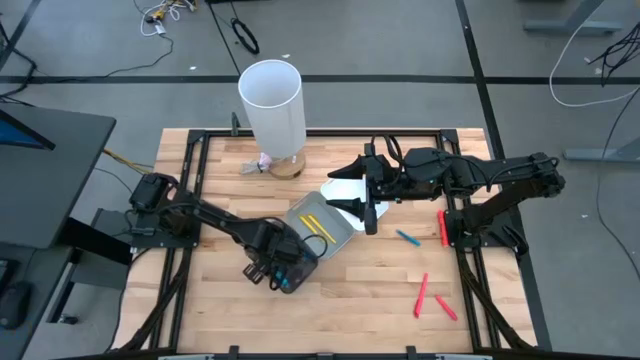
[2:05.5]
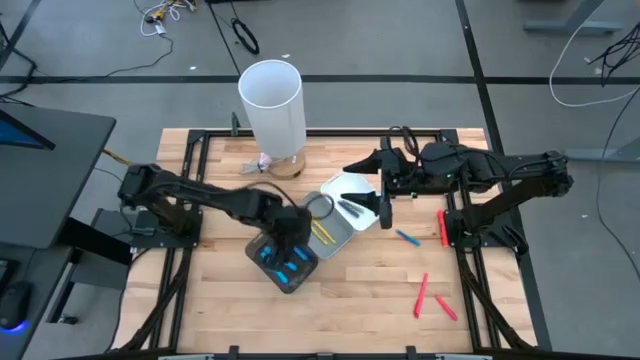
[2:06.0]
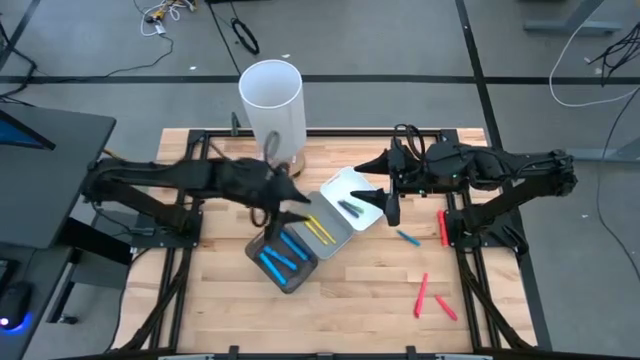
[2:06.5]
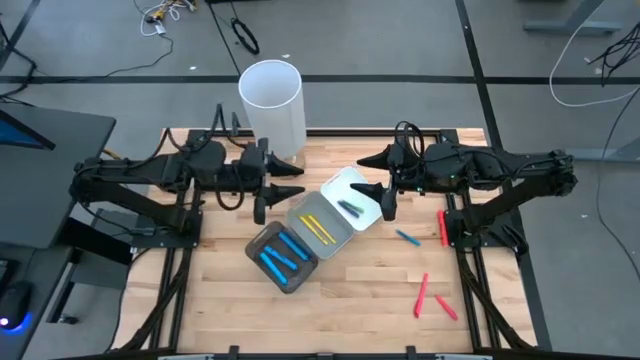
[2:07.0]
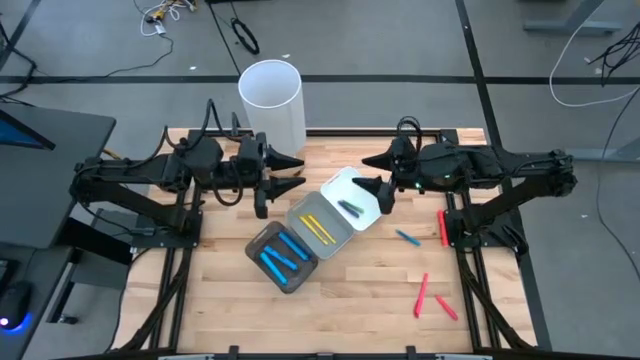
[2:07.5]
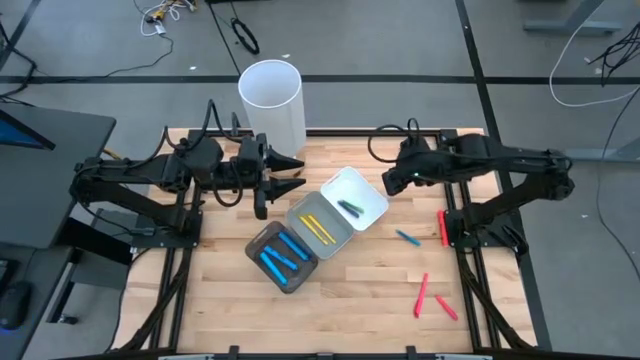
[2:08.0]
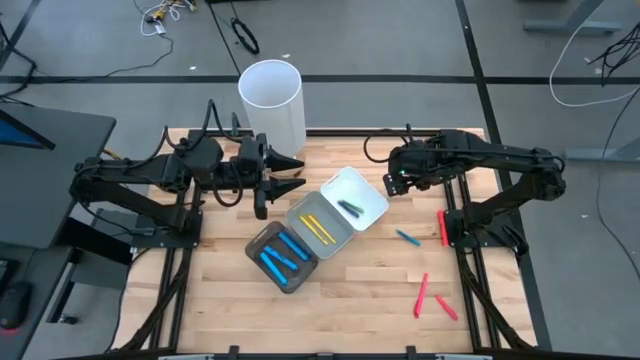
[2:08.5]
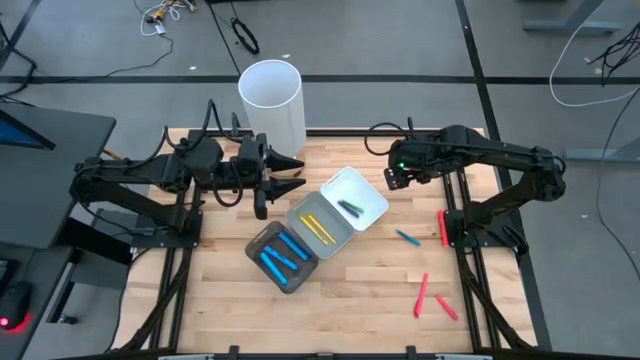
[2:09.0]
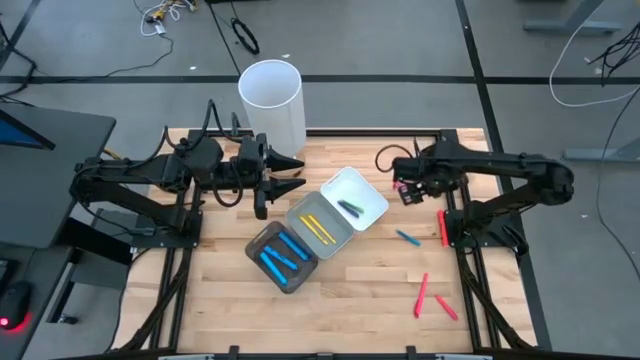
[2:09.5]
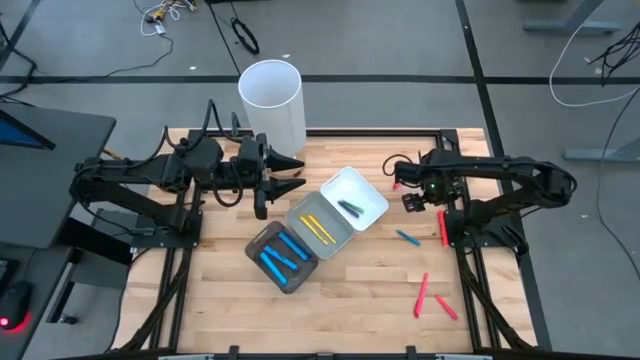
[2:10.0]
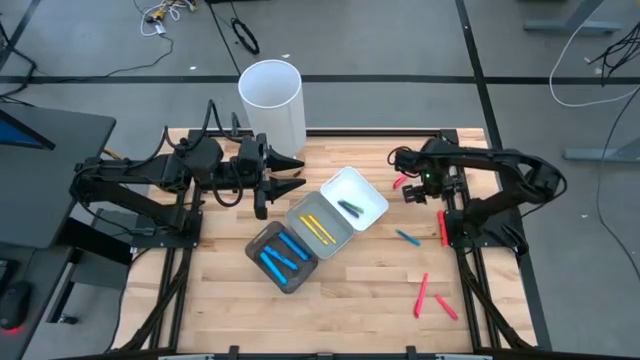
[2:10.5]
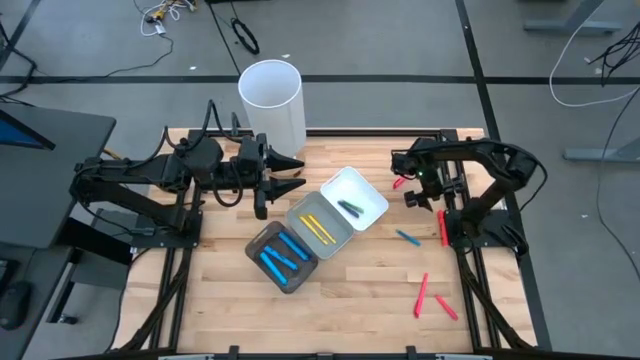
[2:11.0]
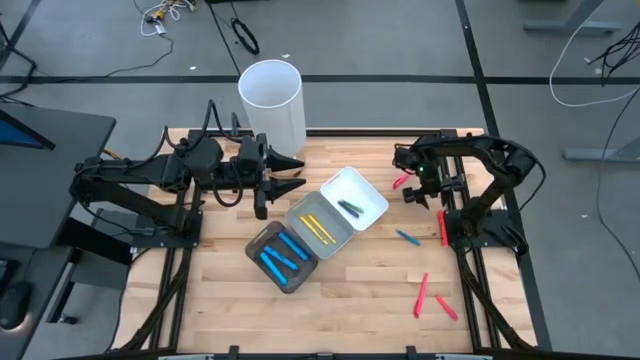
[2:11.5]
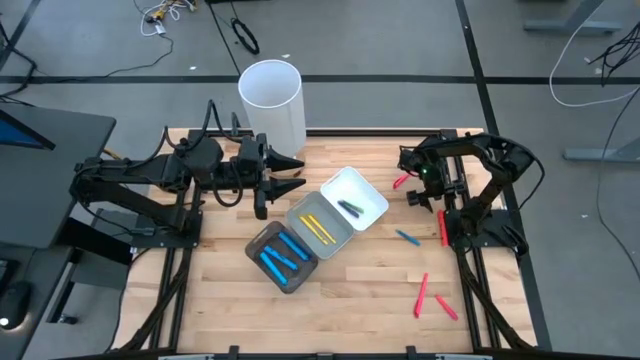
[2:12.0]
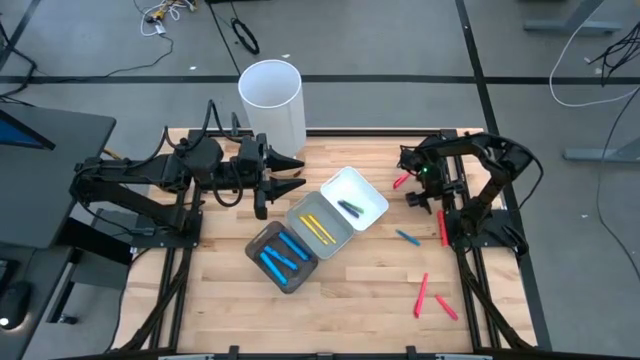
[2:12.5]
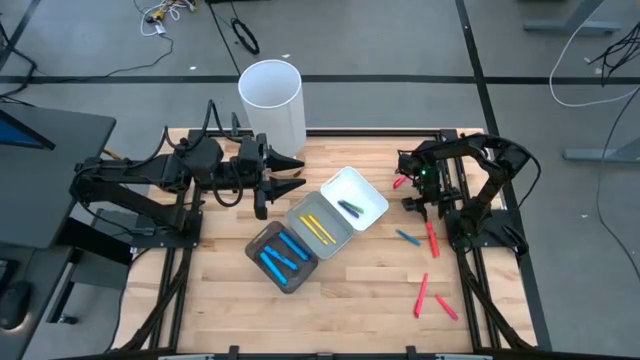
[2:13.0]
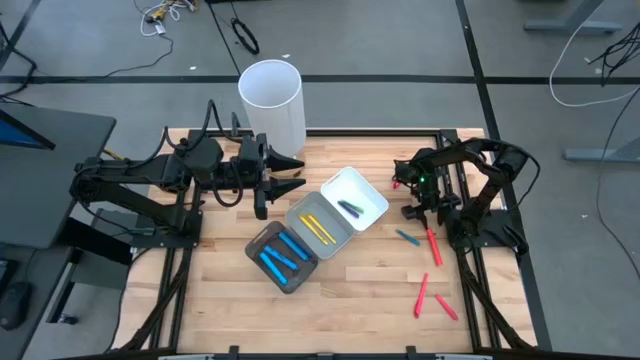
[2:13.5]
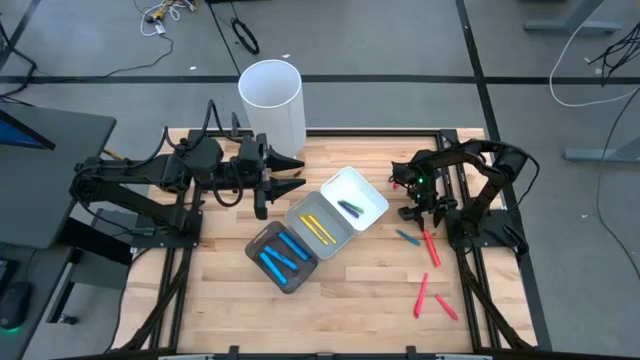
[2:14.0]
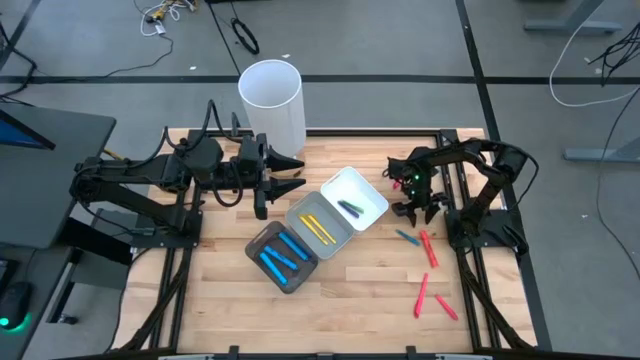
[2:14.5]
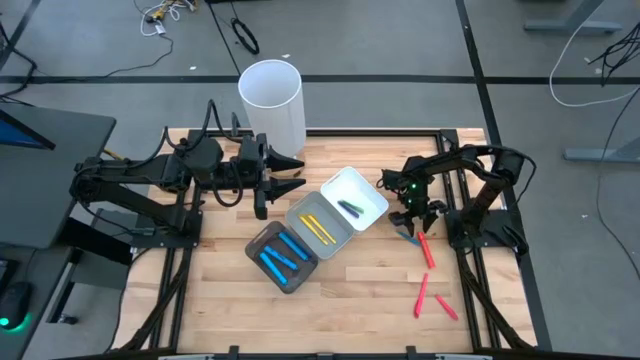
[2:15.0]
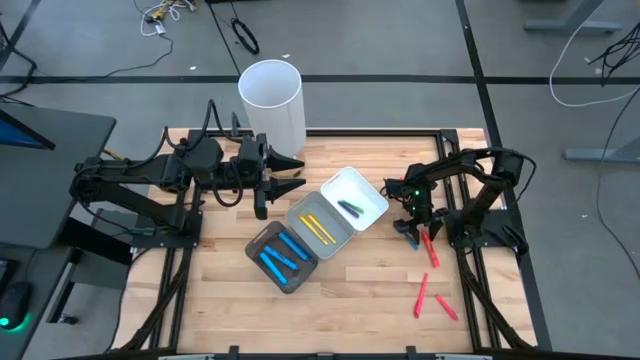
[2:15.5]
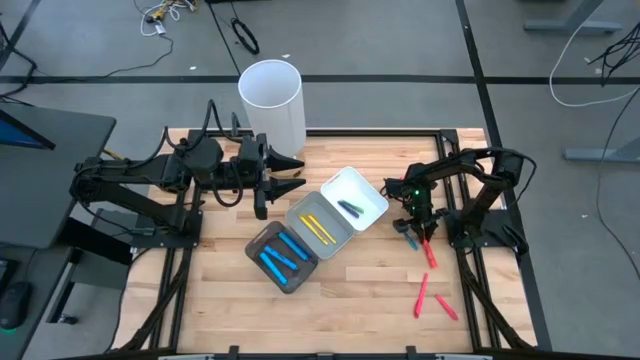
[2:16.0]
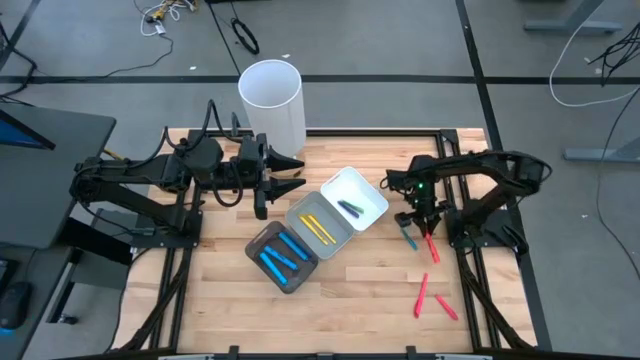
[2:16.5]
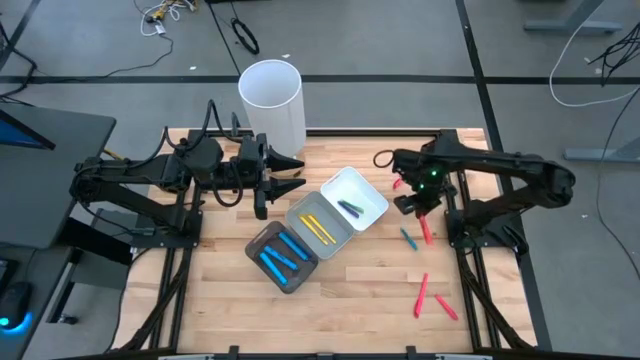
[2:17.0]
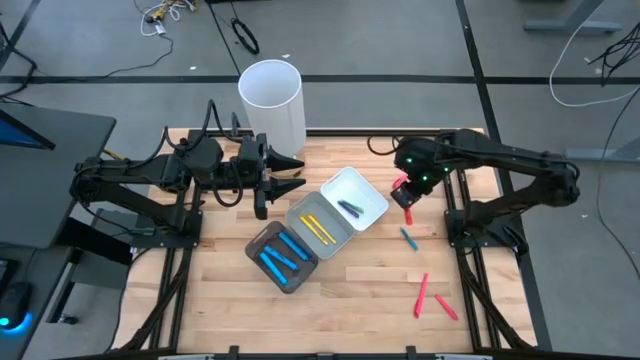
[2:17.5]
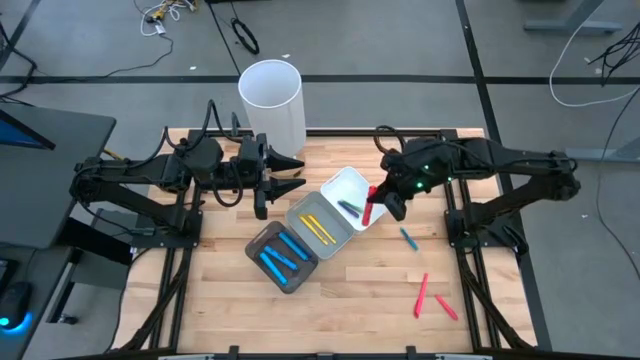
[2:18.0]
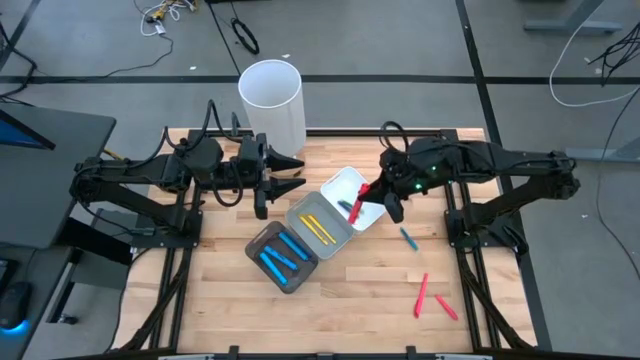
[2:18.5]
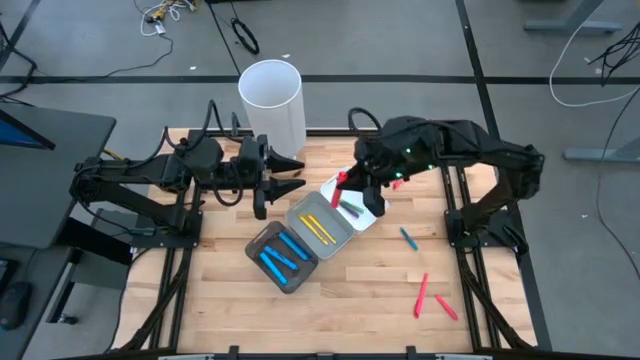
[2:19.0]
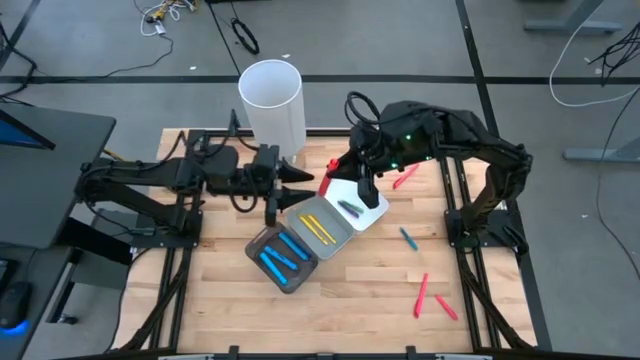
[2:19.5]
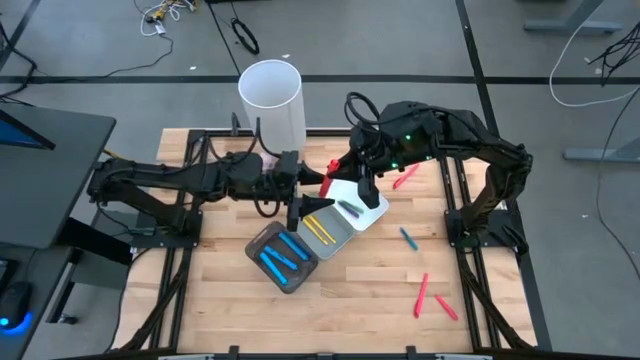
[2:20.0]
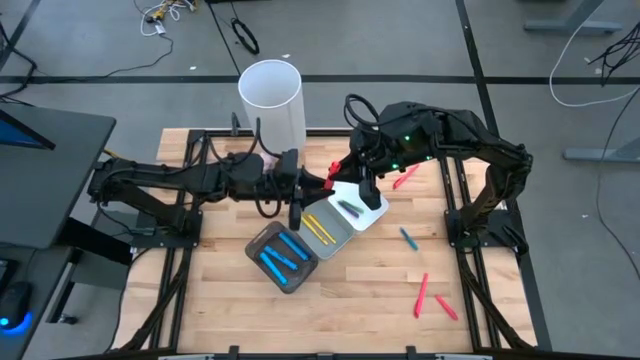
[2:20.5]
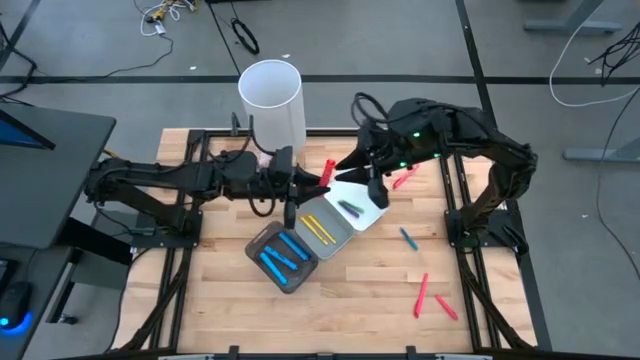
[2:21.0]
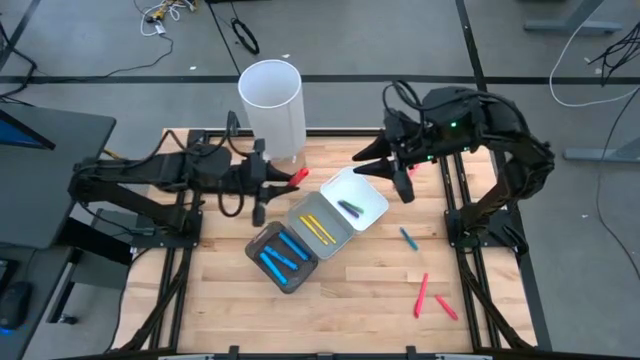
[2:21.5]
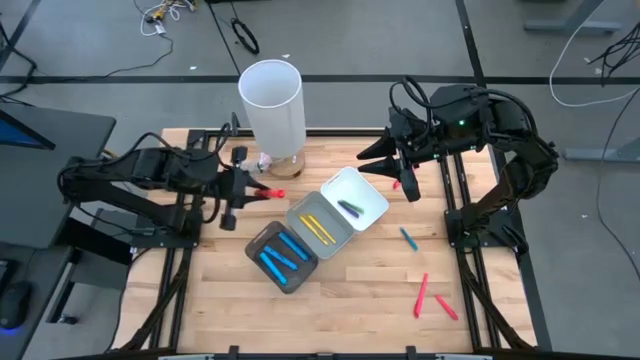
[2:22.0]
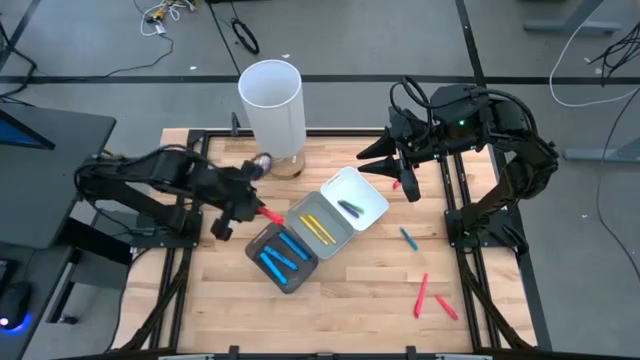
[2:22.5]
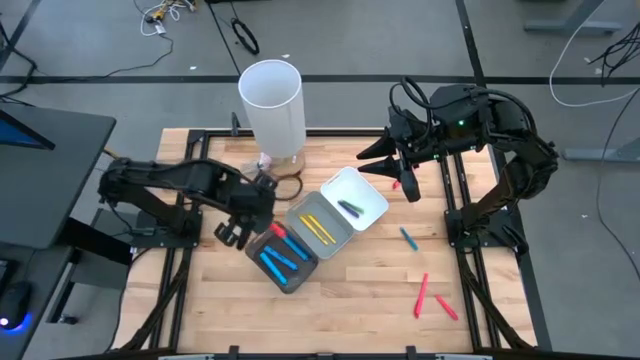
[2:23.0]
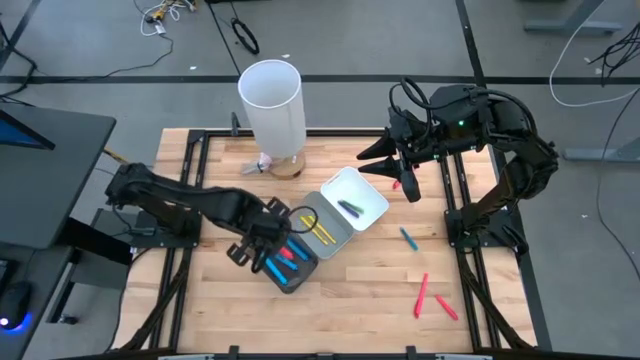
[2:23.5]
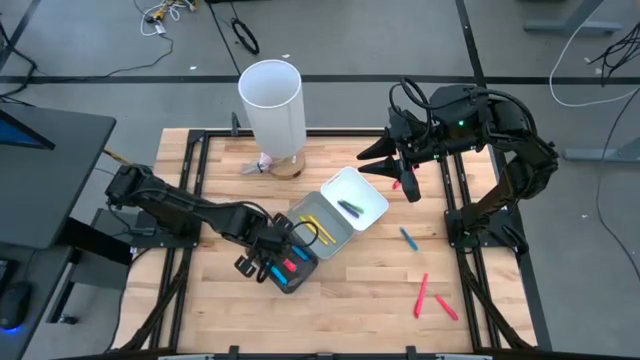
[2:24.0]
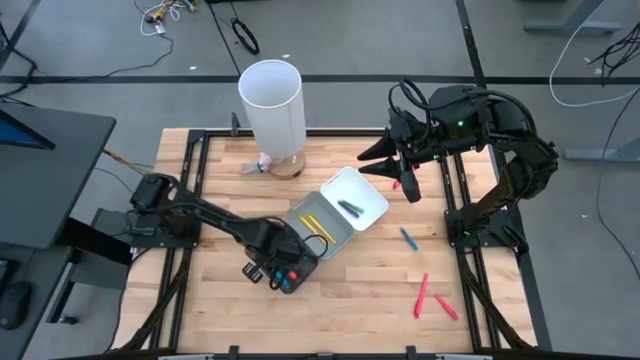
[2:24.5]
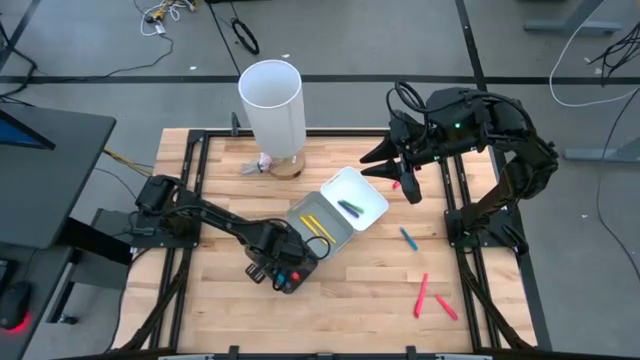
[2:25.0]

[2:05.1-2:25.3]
Task: Pick & Place Markers
Put the orange highlighter into the black bin

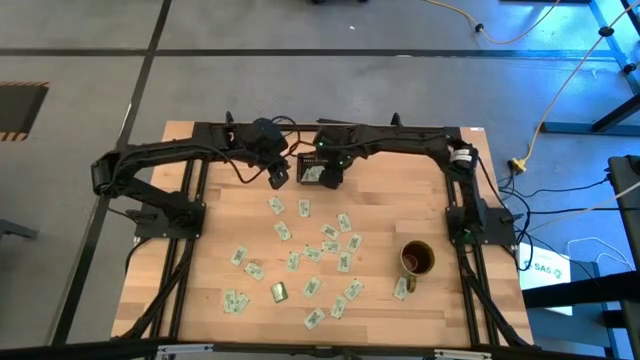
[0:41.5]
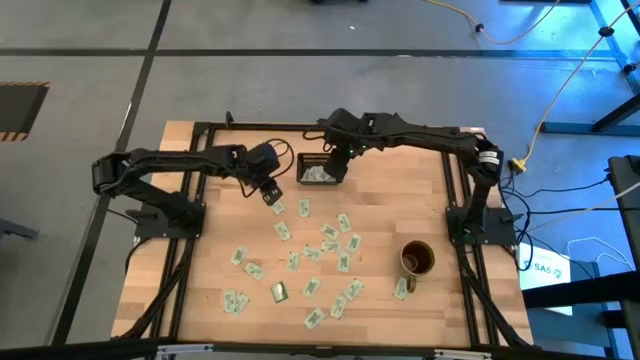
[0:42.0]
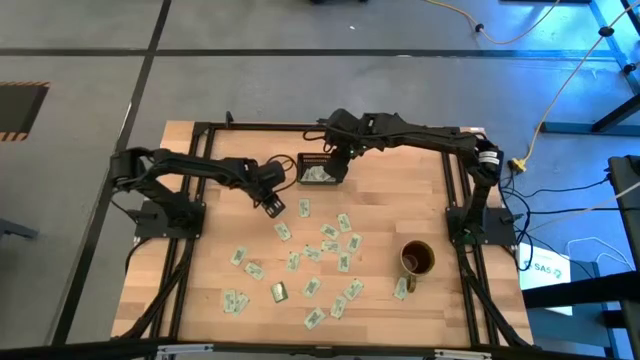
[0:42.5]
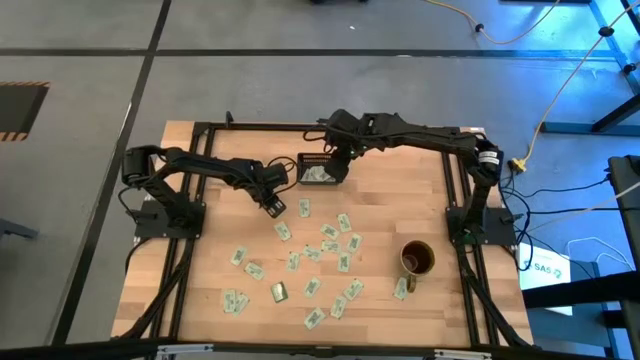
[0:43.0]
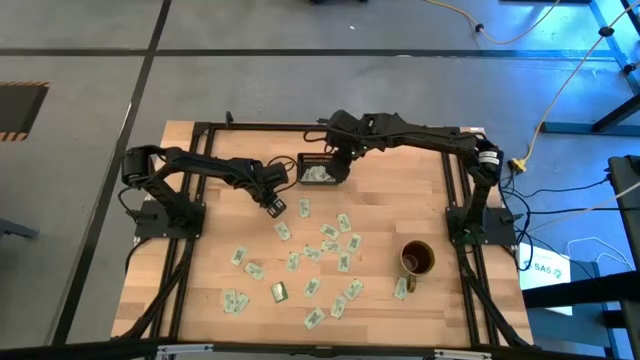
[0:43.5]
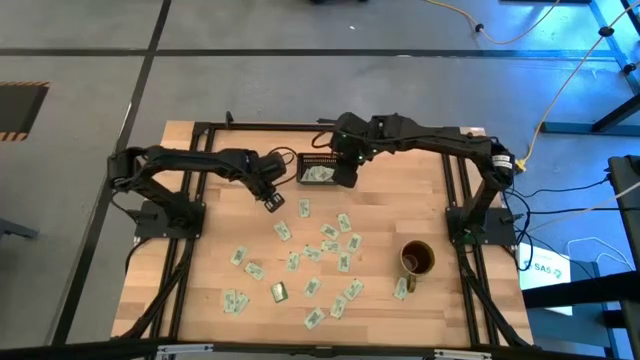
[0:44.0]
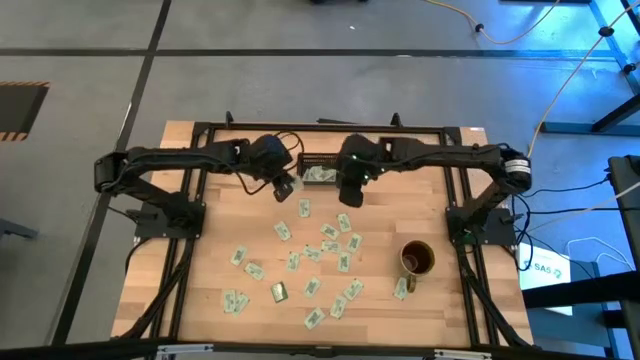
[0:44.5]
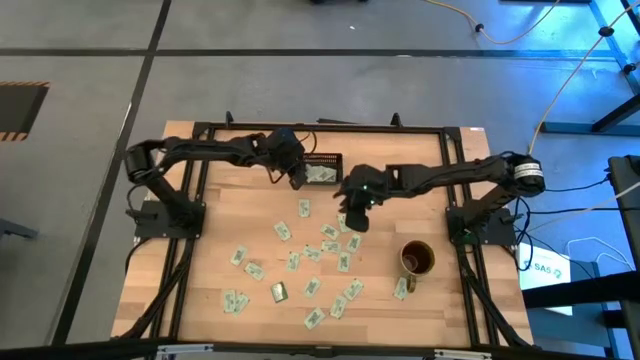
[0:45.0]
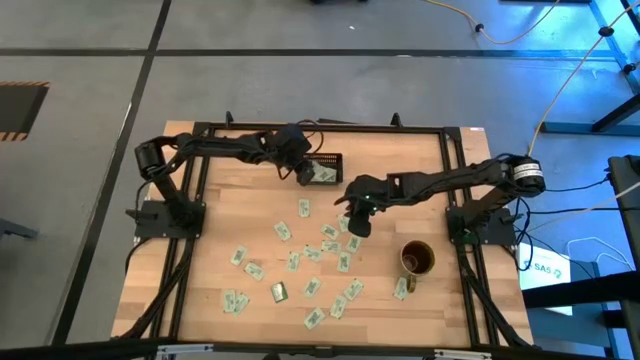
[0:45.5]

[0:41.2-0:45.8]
Task: Pick and place Stevia / Truvia into bins
Put the white stevia packet into the black bin
